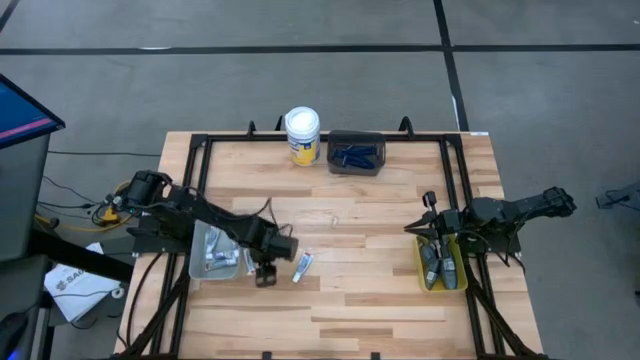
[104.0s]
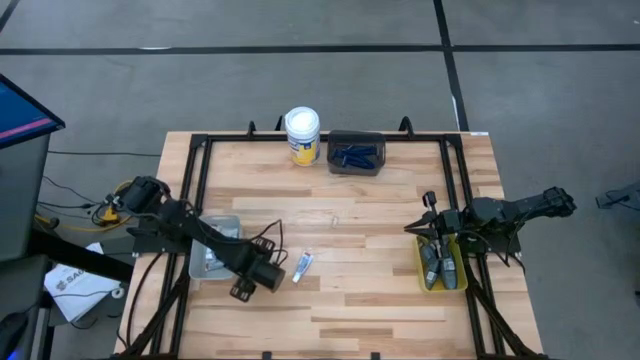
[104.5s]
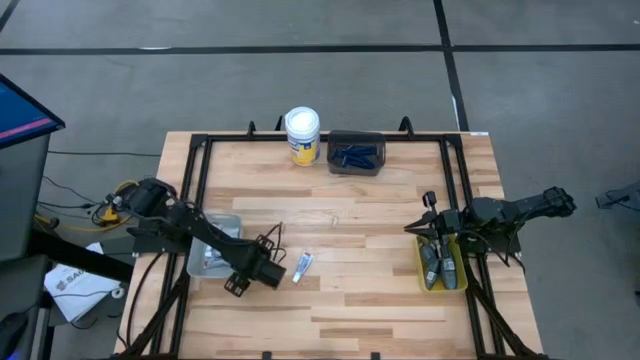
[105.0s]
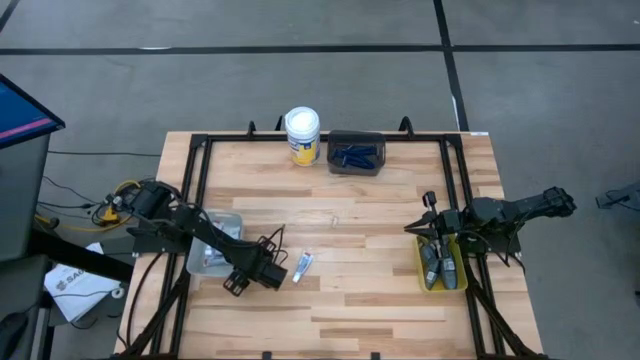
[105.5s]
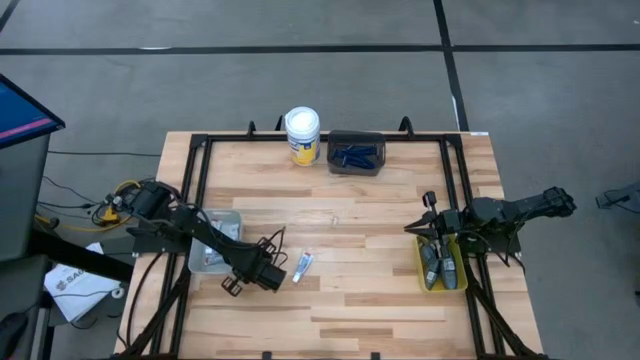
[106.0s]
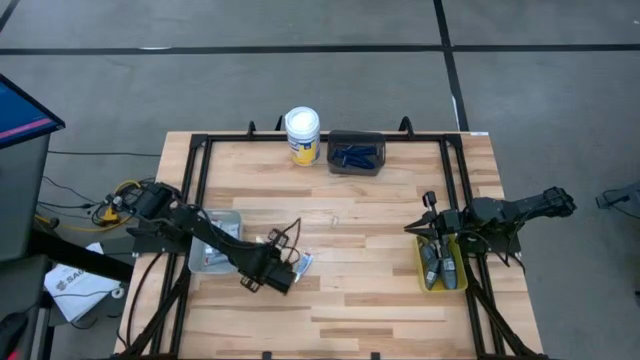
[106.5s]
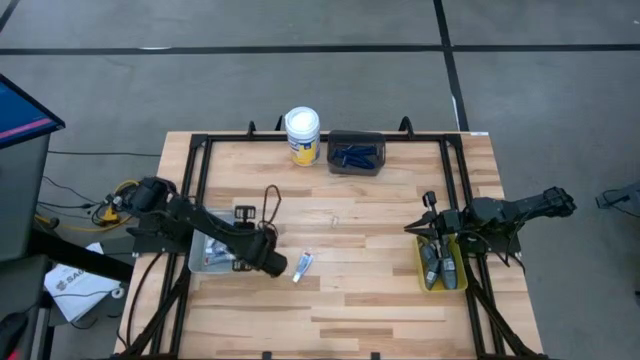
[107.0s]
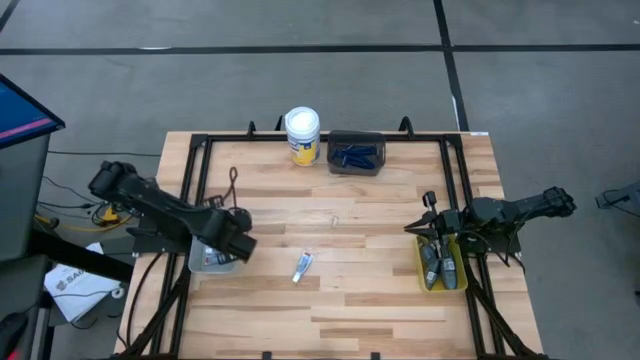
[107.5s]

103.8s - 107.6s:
Task: Pick & Place Travel size toiletries
Put the white toothpaste into the gray bin

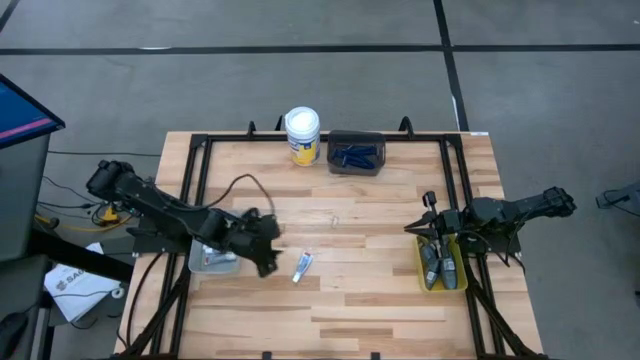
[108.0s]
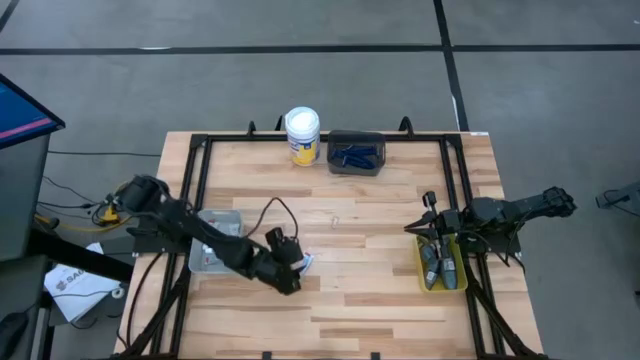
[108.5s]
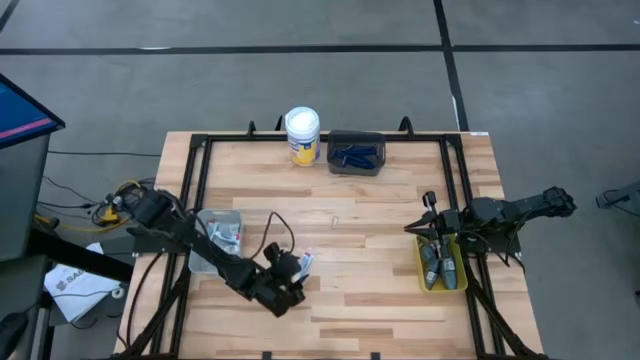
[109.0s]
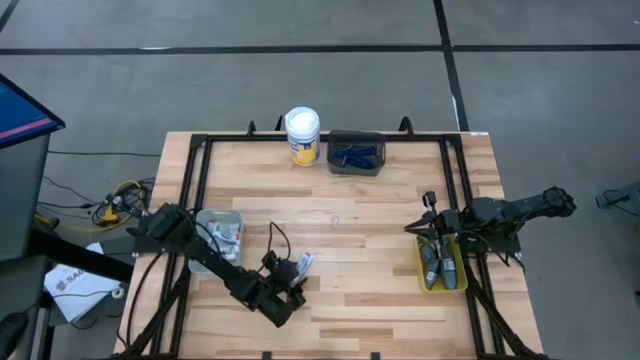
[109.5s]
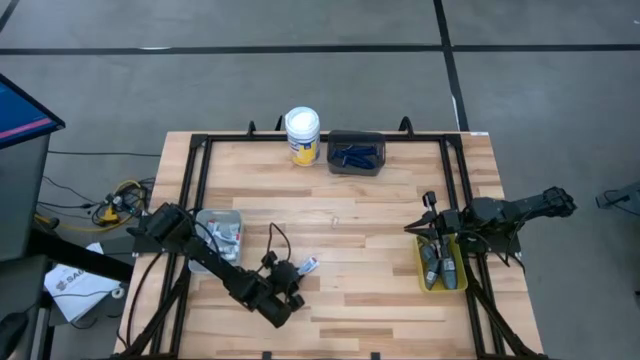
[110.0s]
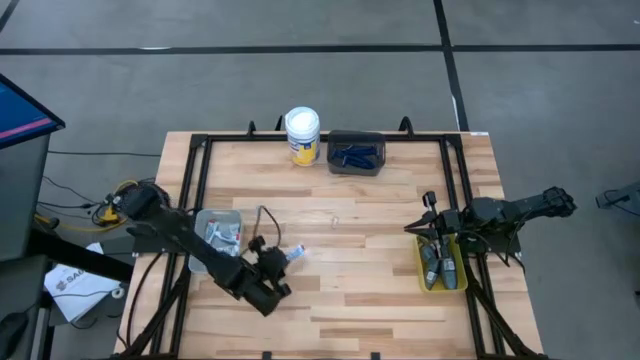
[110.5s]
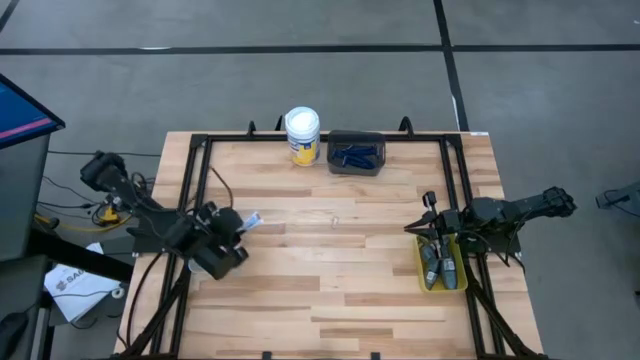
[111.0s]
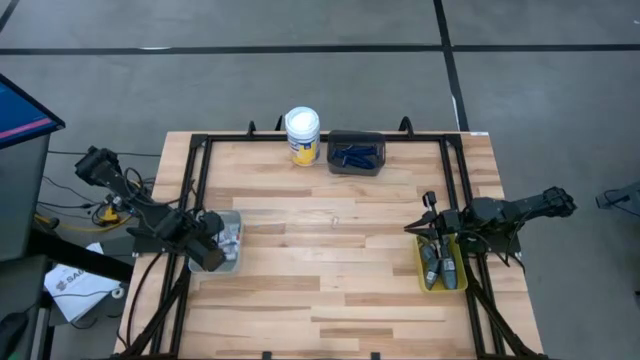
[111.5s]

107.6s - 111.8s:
Put the white toothpaste into the gray bin

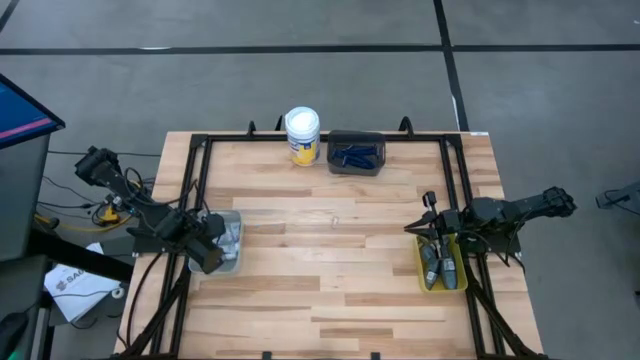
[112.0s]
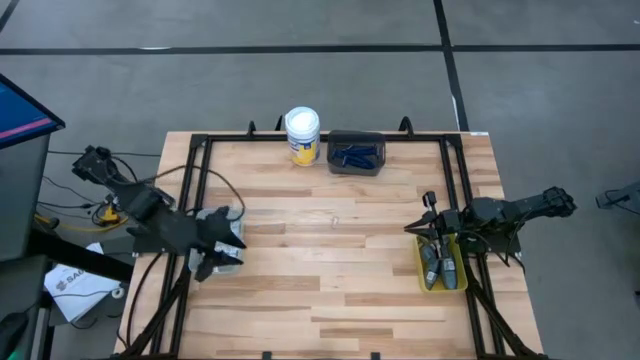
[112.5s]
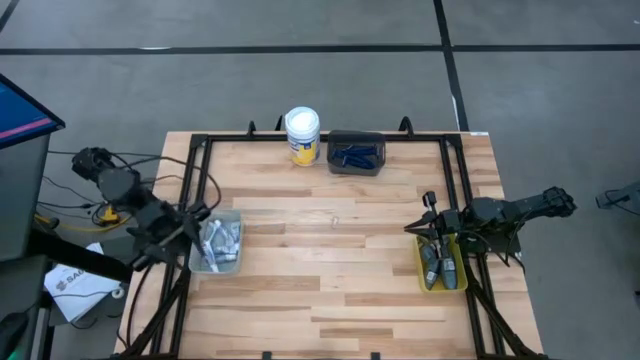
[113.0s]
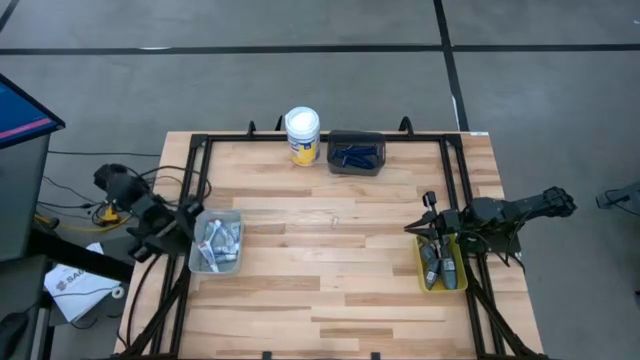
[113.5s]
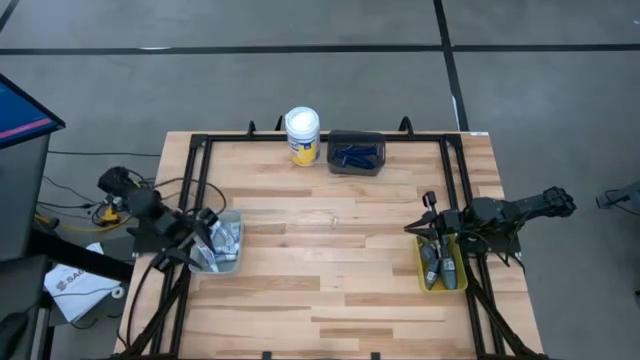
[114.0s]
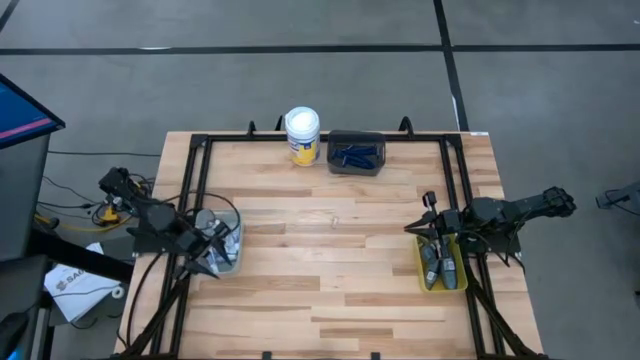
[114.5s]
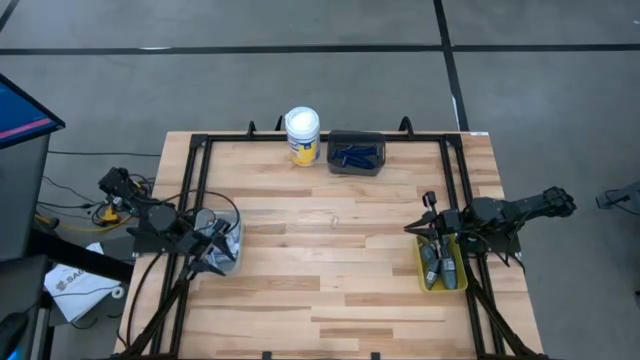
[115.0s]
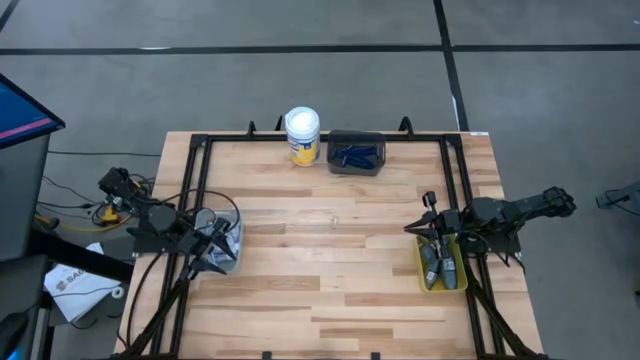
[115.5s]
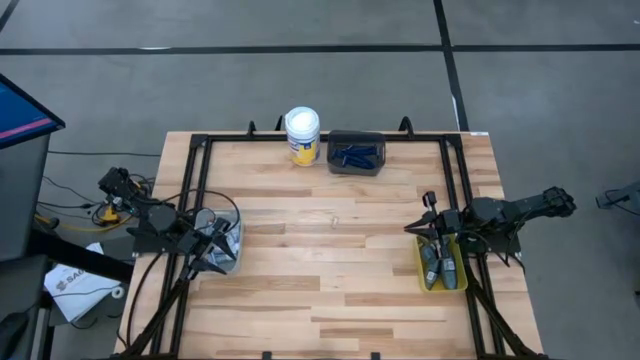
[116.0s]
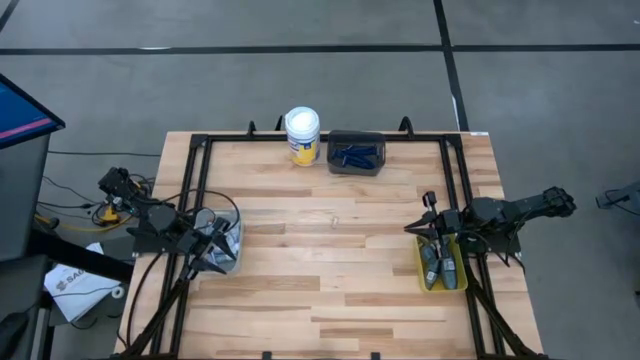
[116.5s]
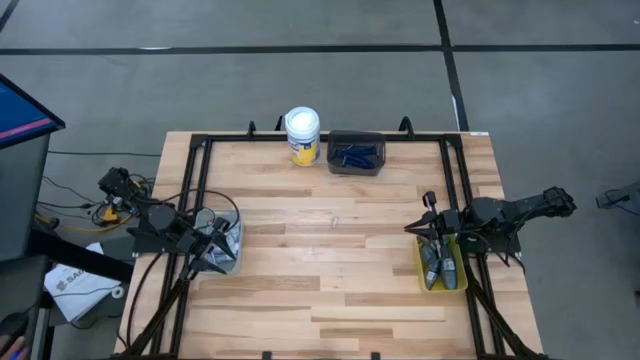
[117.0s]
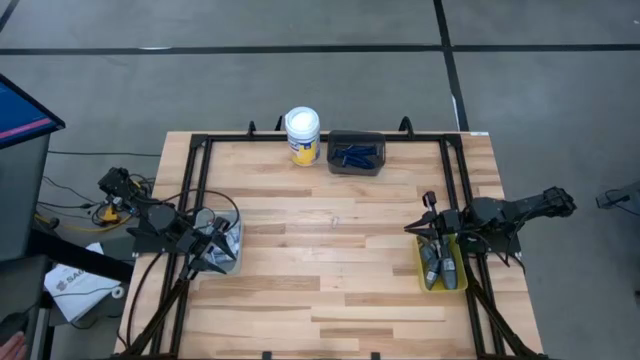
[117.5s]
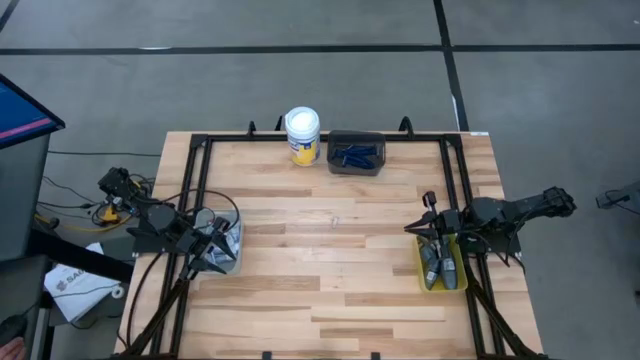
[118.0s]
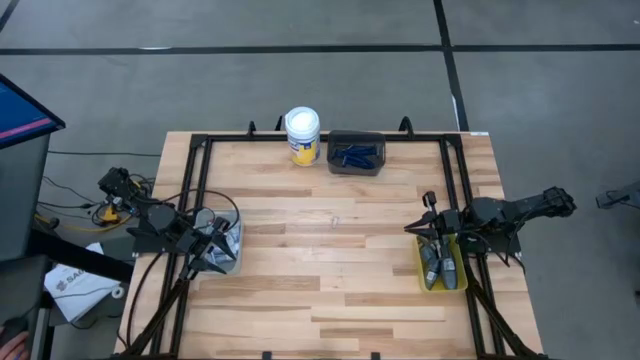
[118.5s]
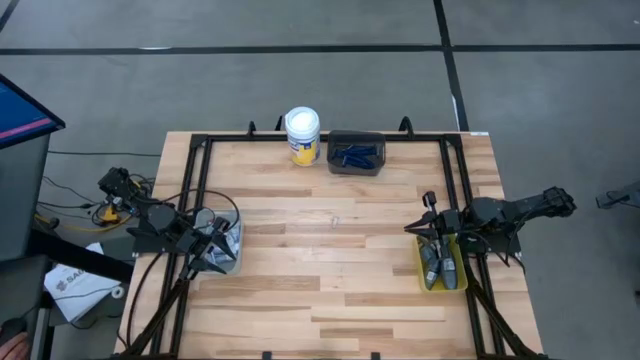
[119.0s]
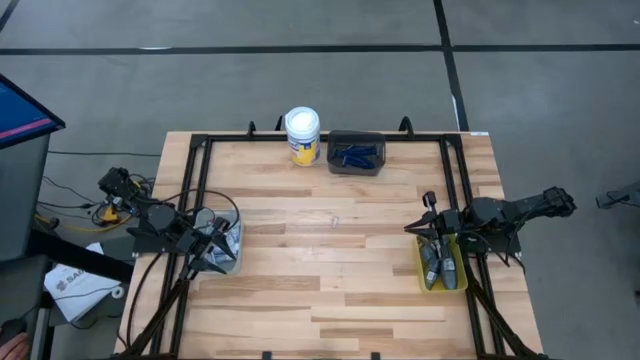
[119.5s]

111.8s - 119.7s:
Return to Home Position

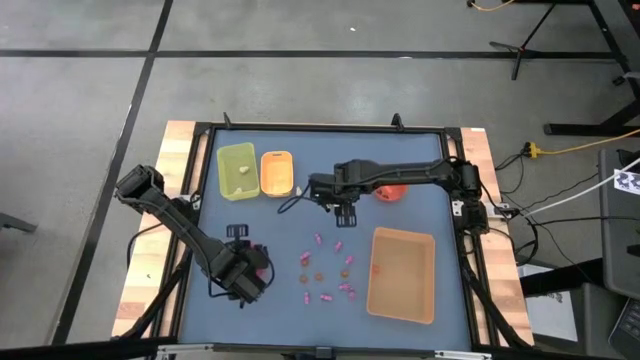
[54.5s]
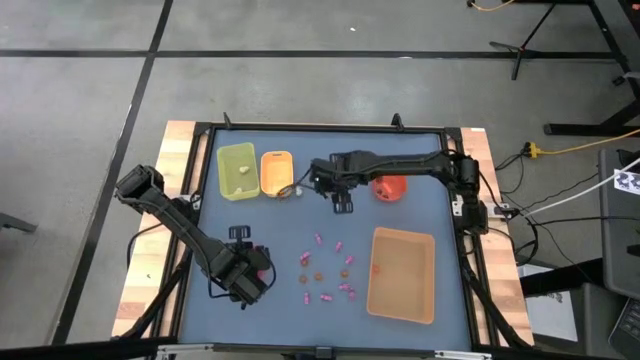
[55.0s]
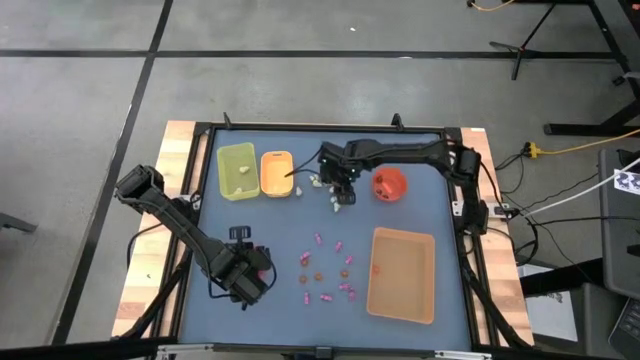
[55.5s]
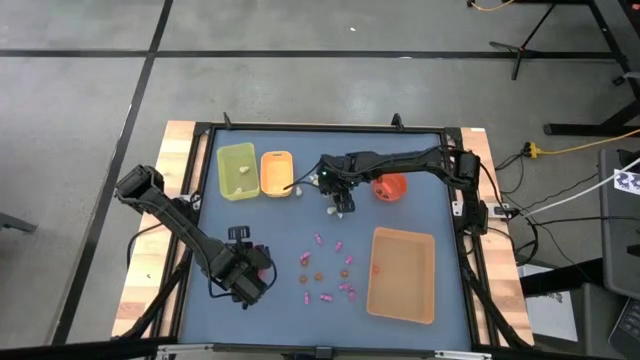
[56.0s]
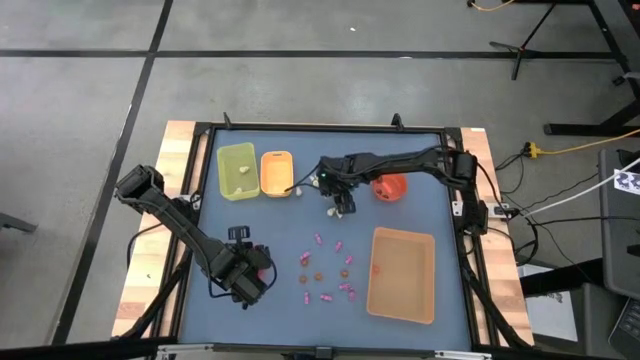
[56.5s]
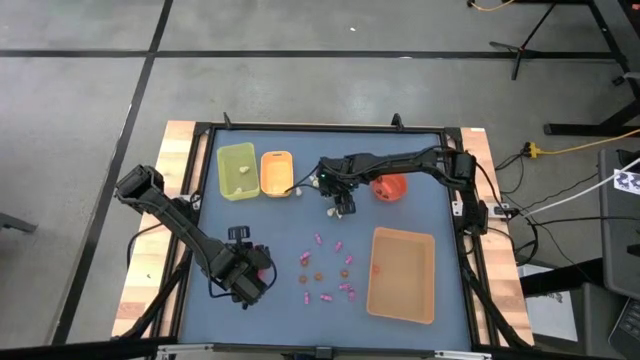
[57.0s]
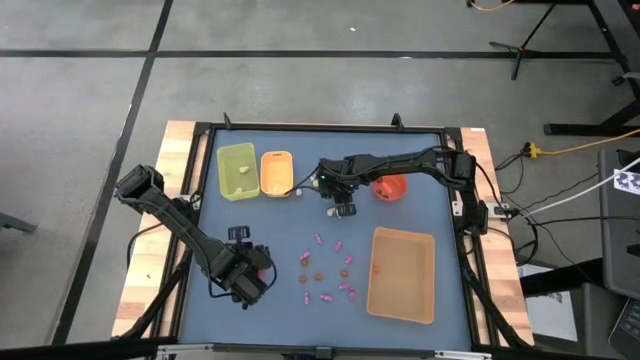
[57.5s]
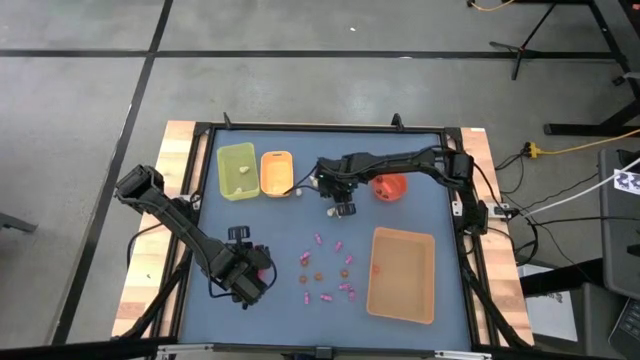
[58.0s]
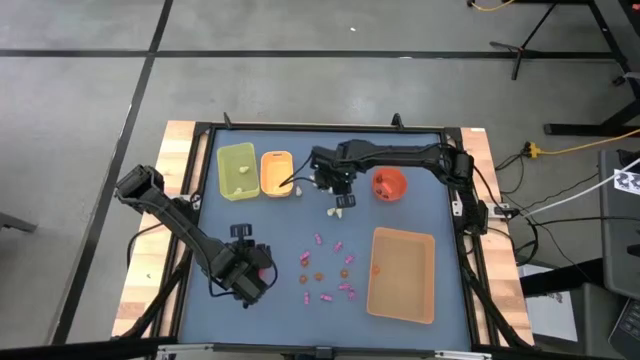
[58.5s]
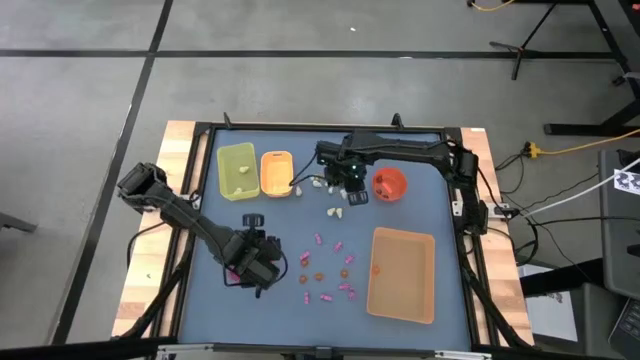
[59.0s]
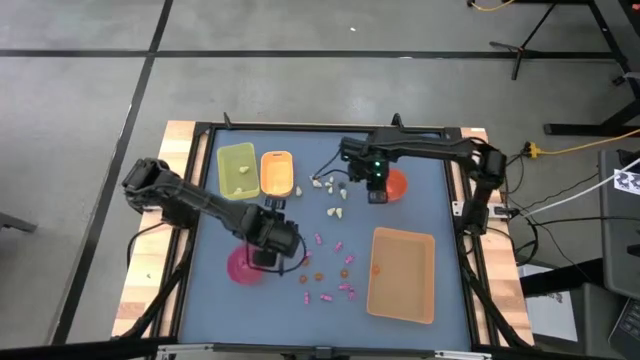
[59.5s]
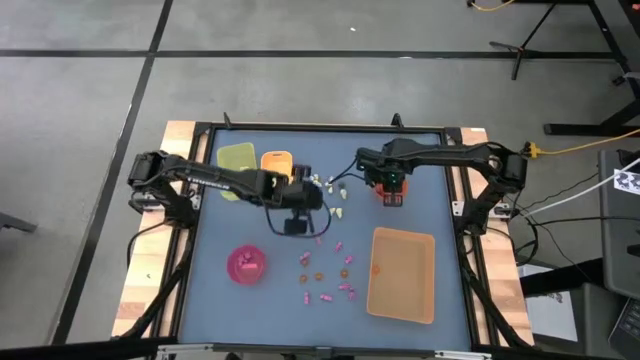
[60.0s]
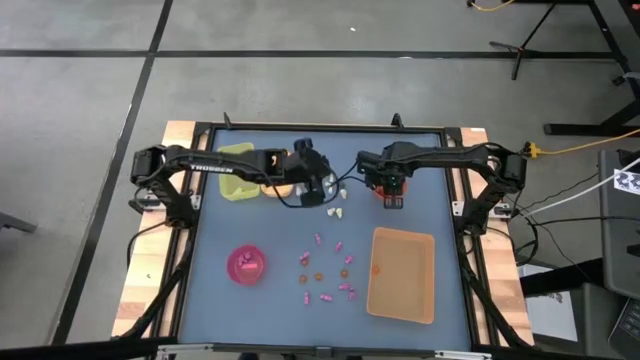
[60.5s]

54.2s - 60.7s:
Task: Sort Halloween decoration
Put the black skull toy into the orange bowl
